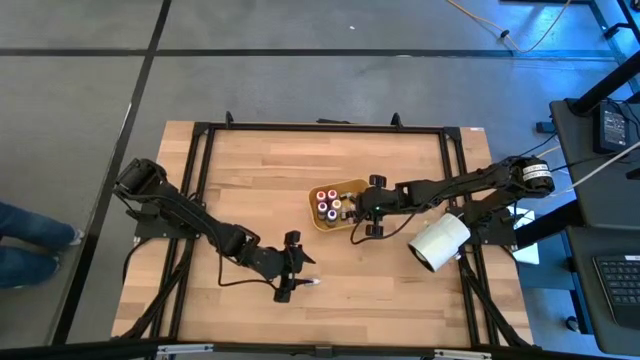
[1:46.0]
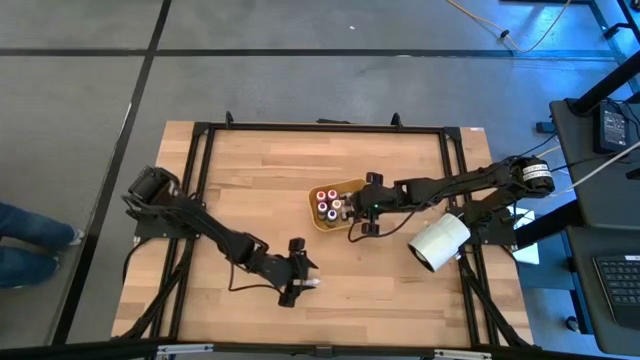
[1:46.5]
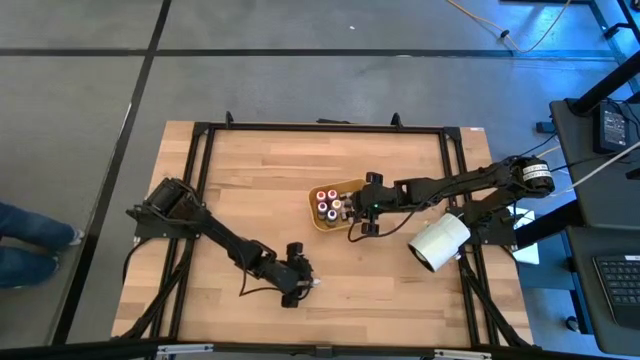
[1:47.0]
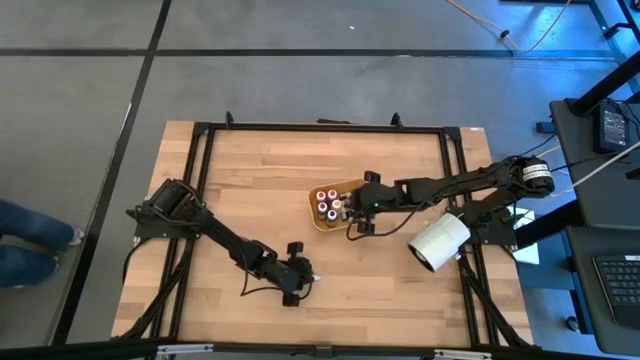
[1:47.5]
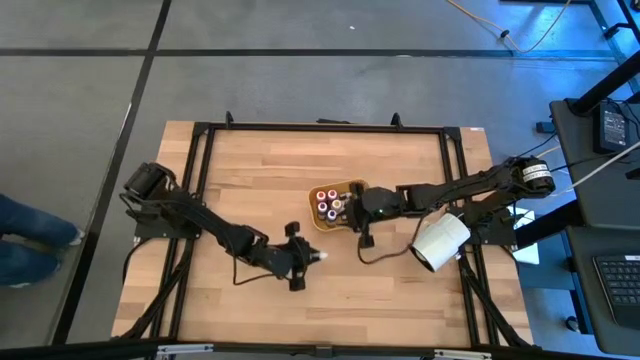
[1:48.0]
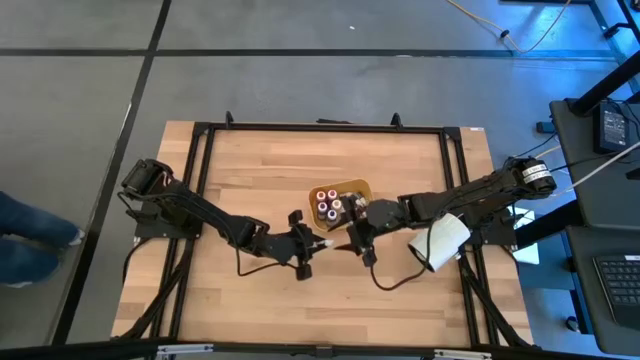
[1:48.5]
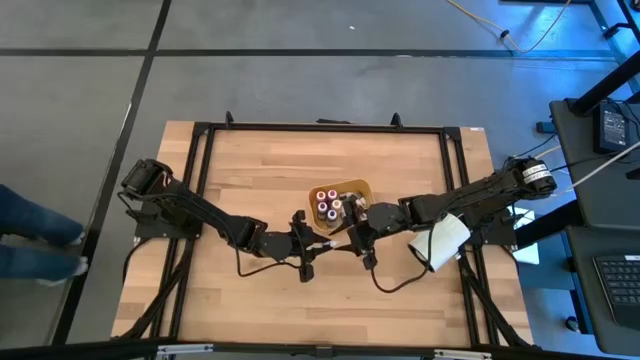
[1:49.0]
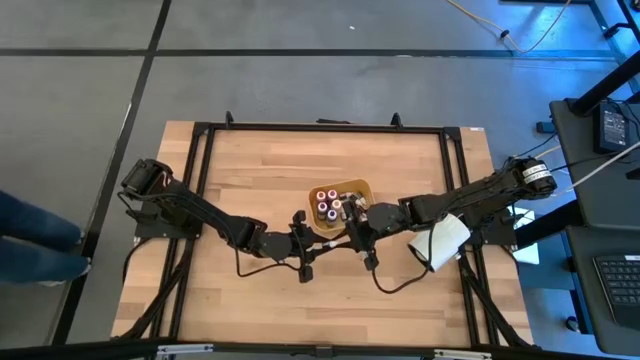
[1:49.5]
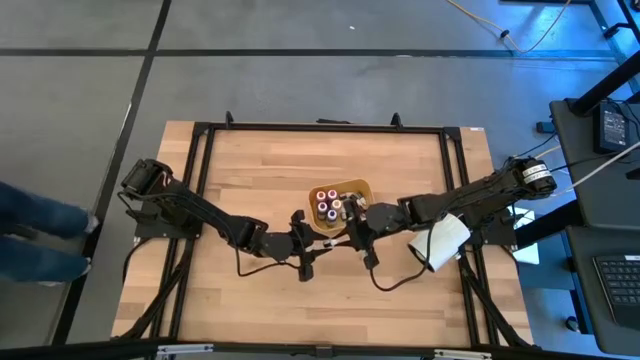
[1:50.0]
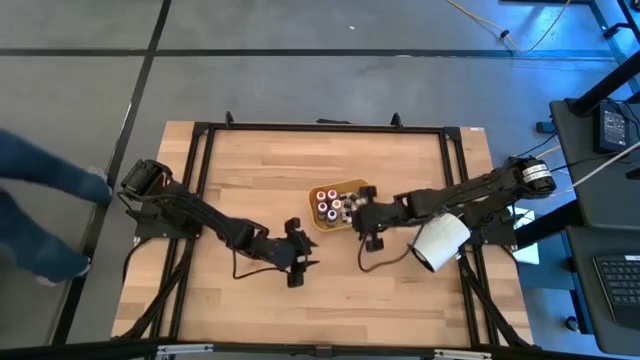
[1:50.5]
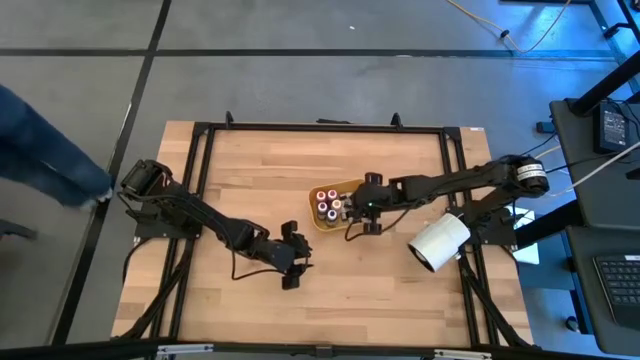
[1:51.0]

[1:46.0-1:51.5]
Task: Pick & Place food coloring
Put the small black food coloring bottle into the yellow bin

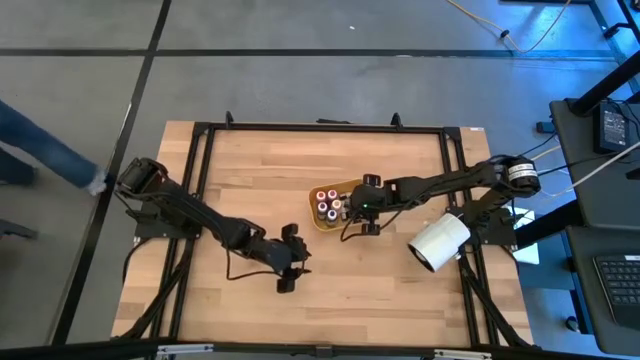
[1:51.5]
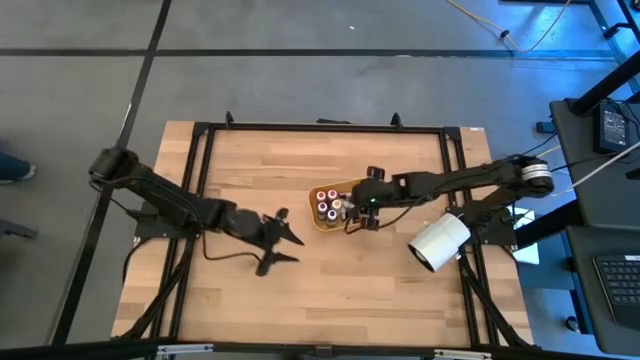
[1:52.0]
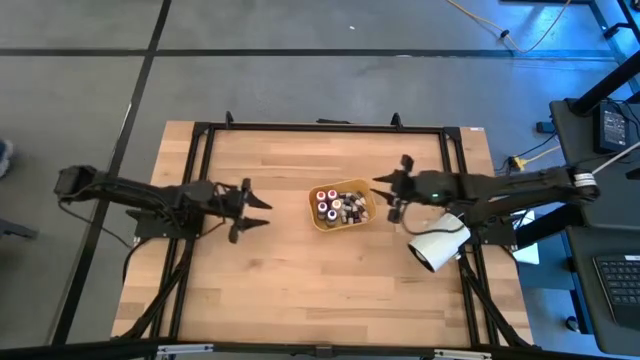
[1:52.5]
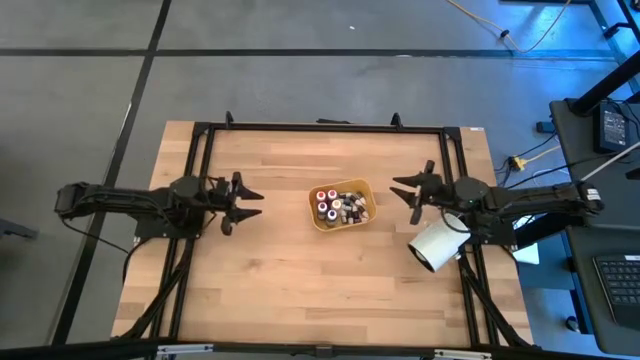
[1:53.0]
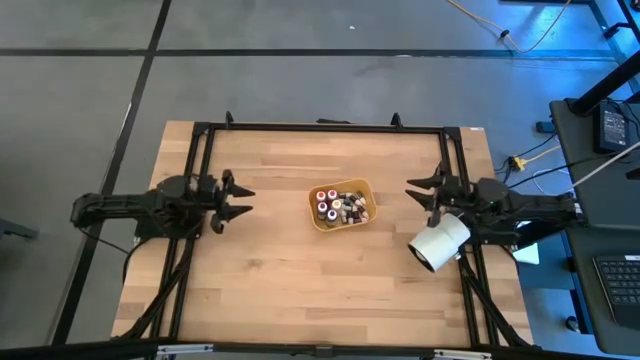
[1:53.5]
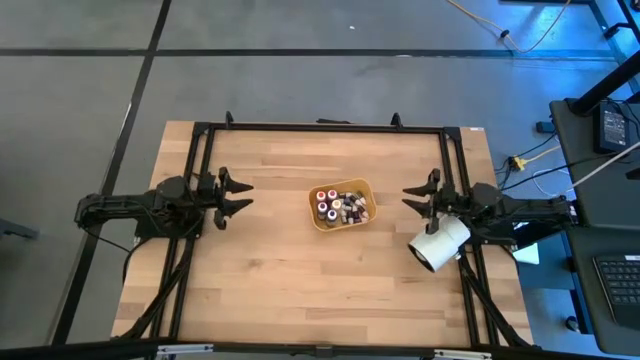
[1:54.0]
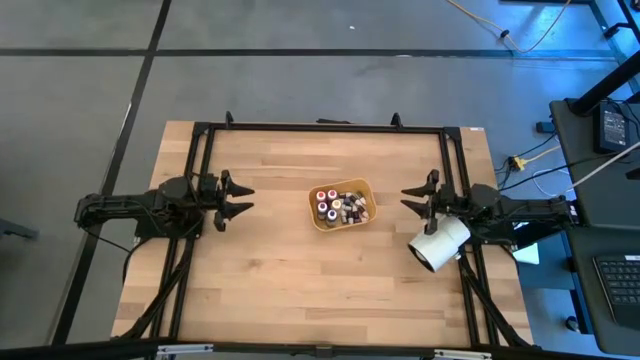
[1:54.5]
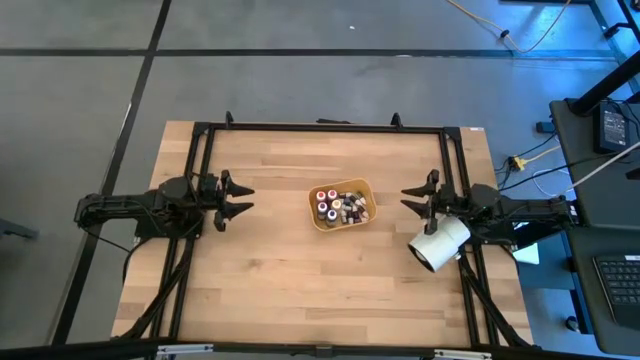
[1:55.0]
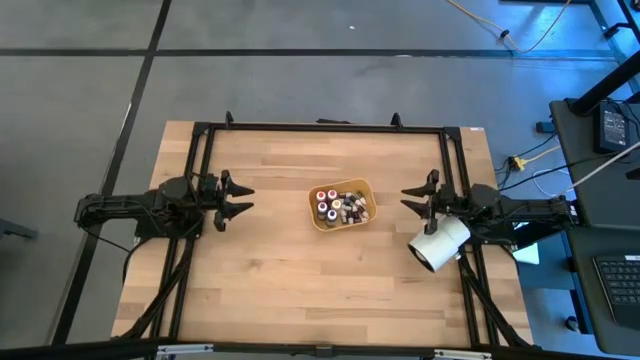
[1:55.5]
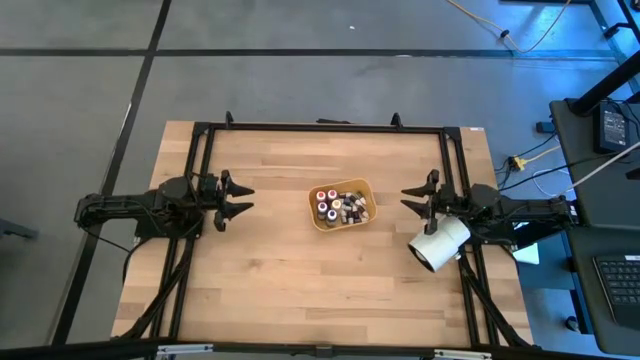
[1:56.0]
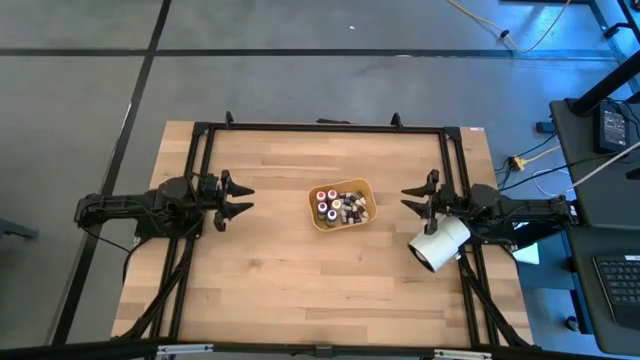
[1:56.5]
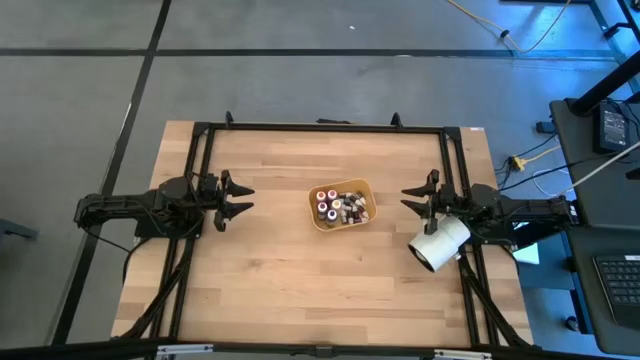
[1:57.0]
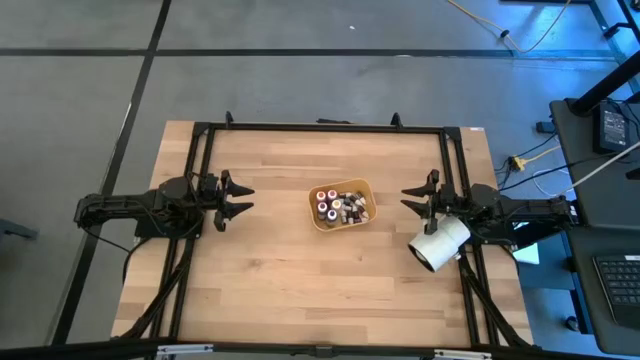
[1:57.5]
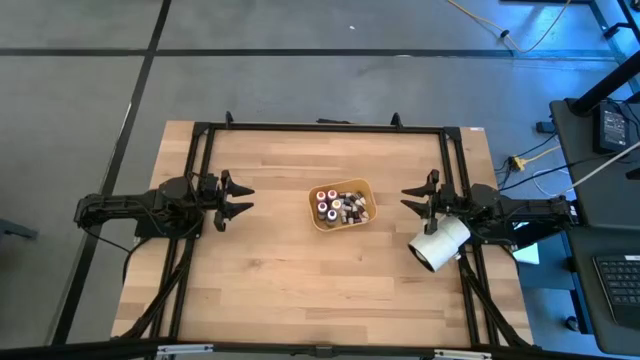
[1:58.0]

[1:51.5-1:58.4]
Return to Home Position

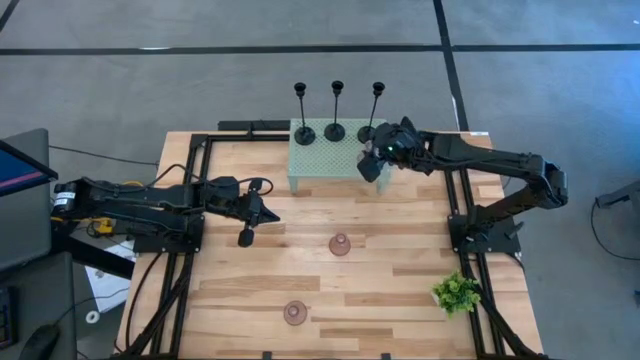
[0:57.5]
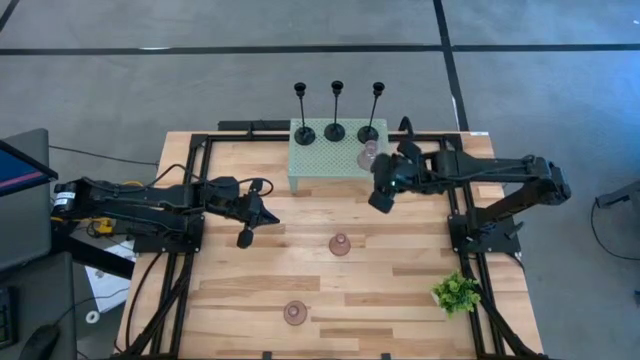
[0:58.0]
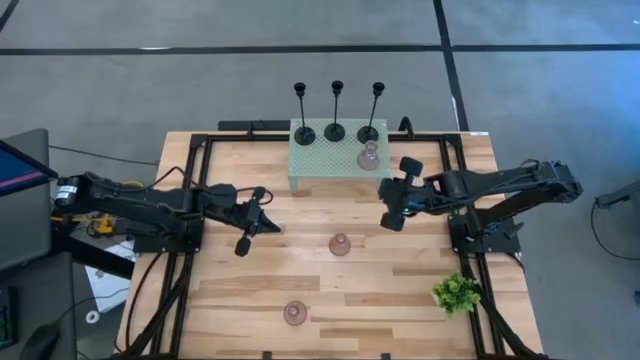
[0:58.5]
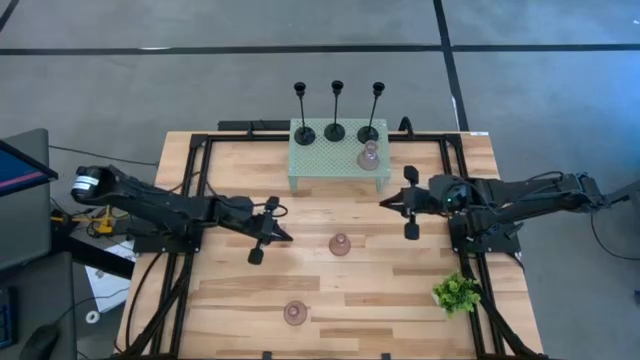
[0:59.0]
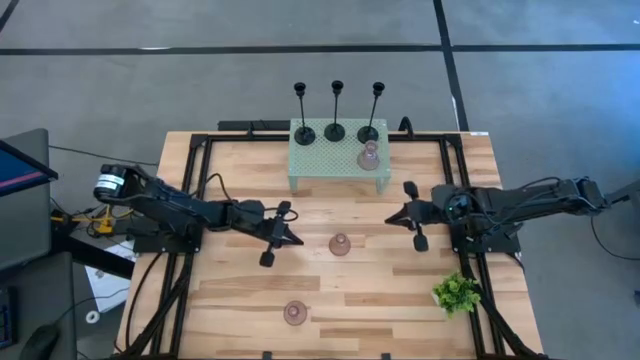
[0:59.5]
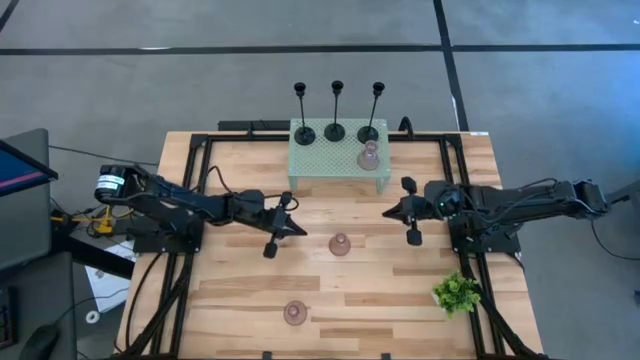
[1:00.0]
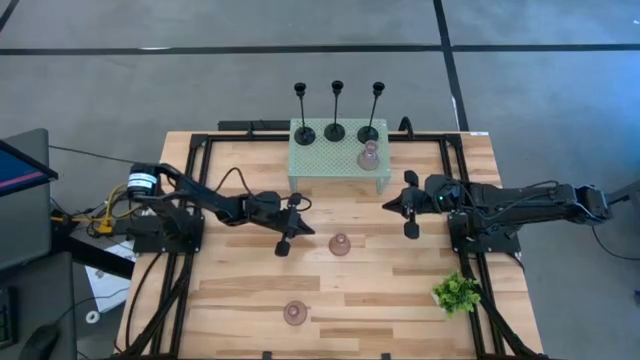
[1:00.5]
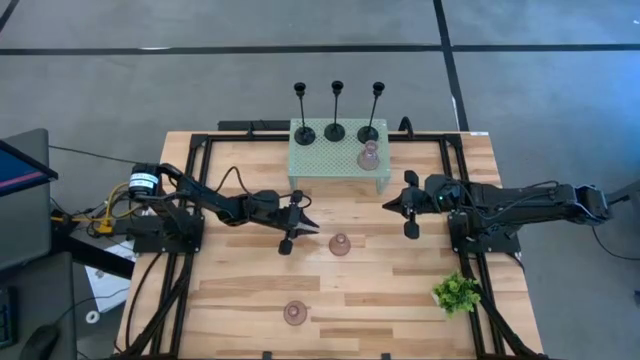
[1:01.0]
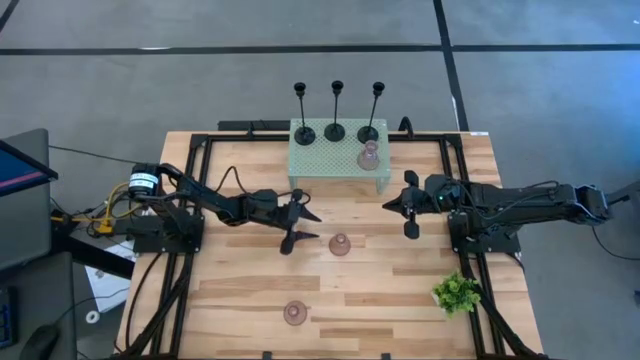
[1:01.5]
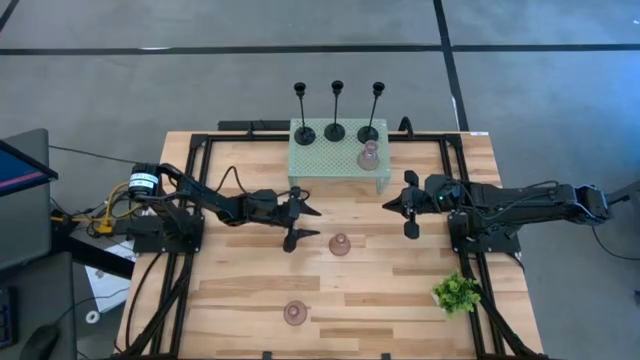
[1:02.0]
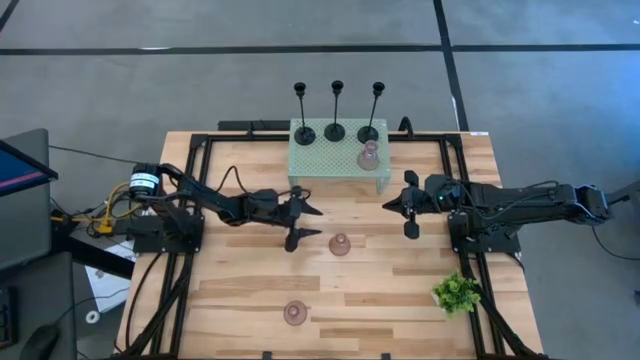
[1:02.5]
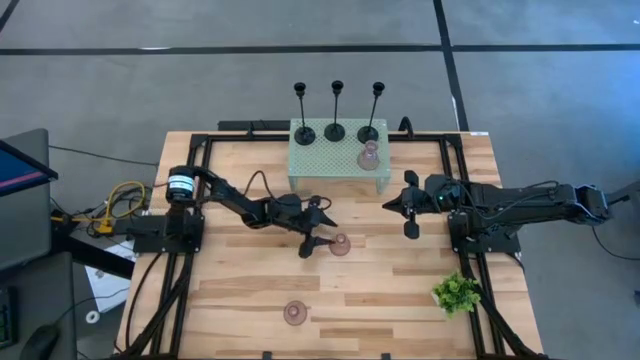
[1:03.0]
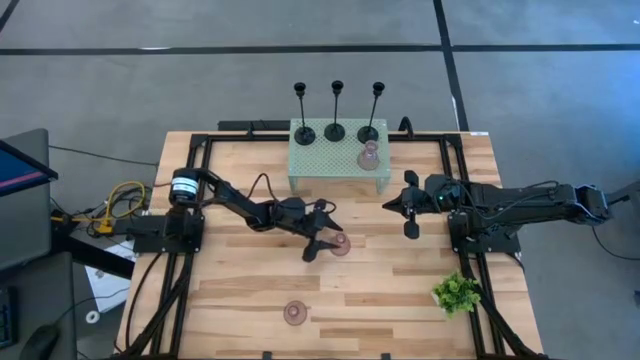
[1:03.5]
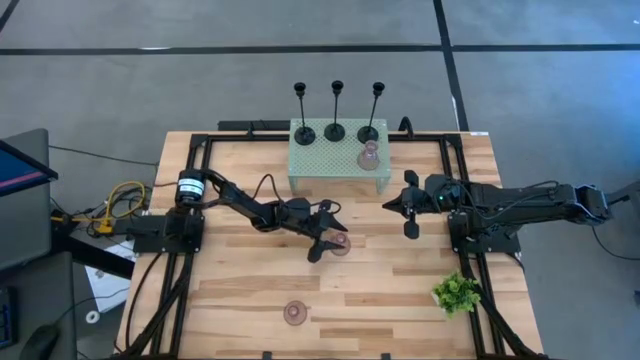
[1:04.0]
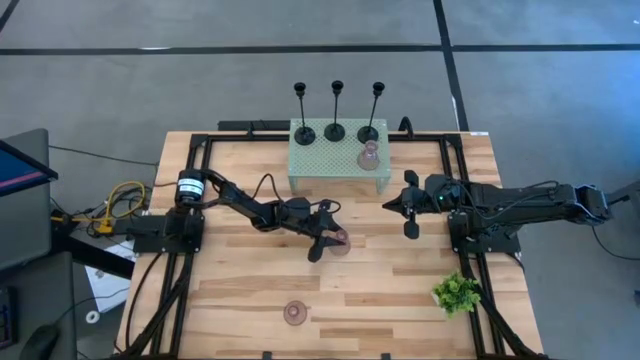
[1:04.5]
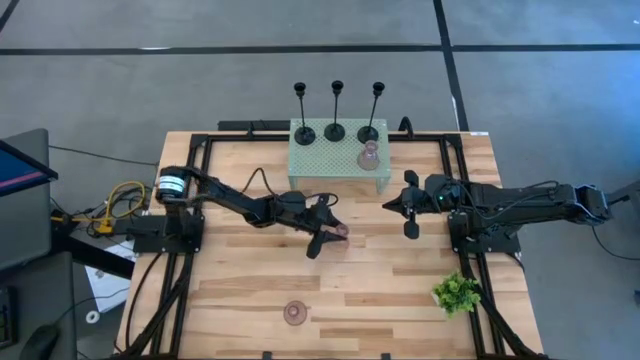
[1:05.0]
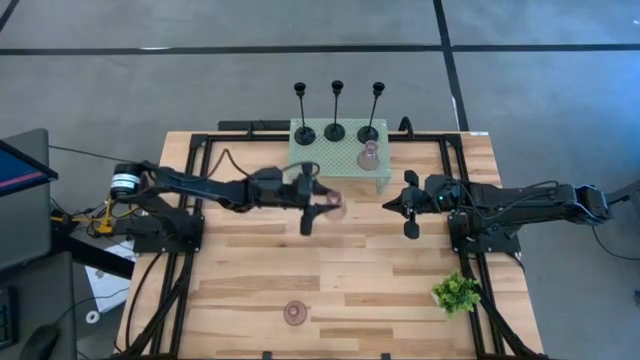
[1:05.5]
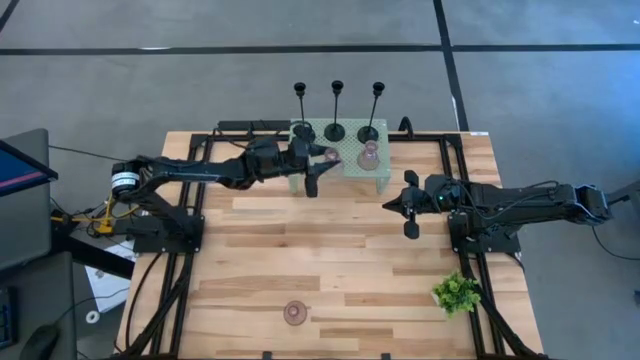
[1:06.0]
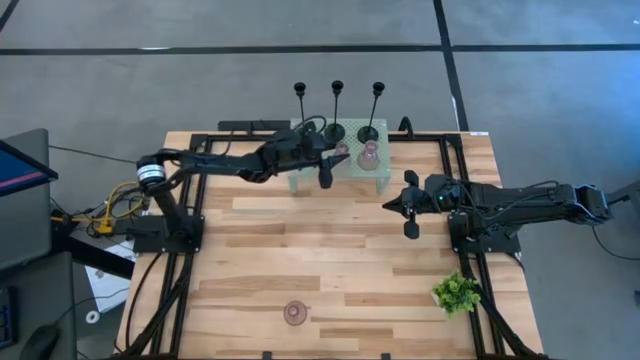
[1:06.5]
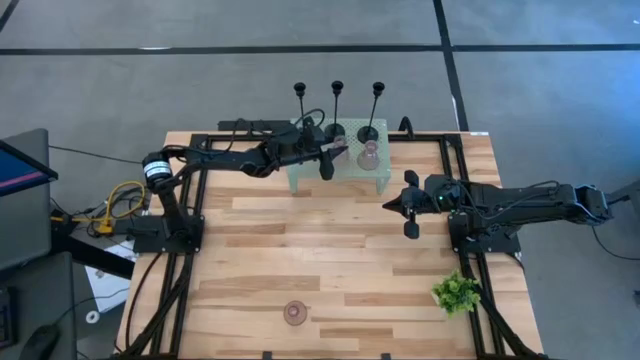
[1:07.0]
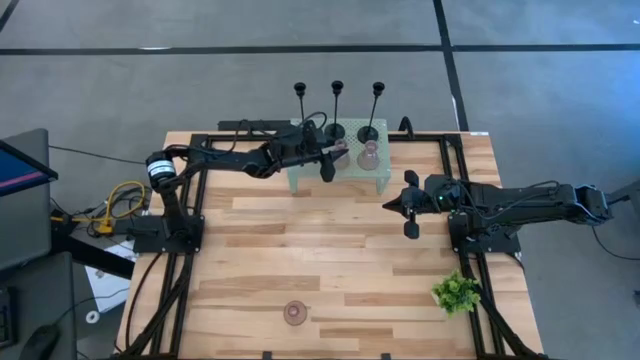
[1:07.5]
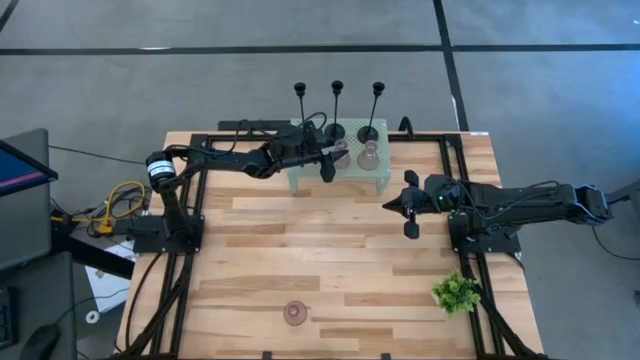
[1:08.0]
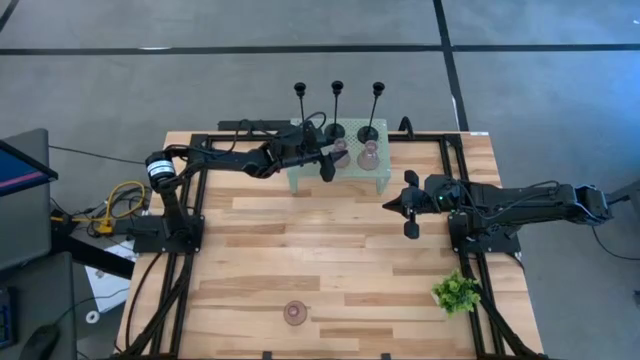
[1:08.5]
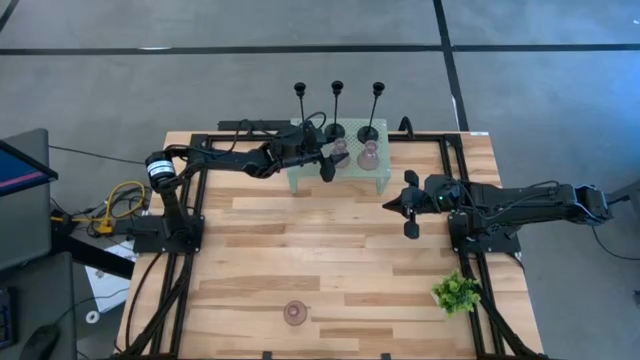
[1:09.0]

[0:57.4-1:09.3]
Task: Pick & Place candle stick holders
Put the top purple vase candle holder on the shelf
